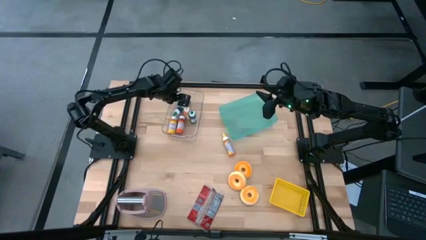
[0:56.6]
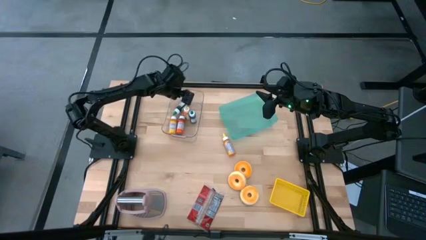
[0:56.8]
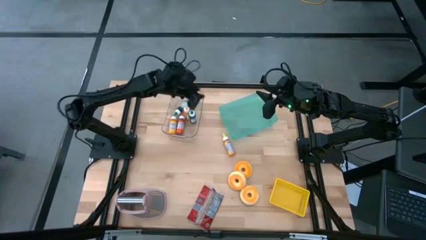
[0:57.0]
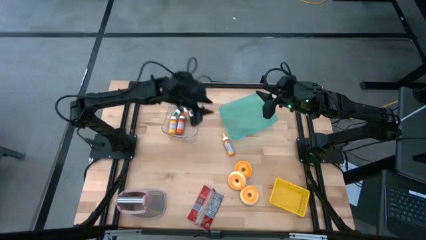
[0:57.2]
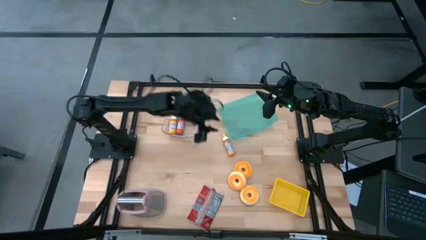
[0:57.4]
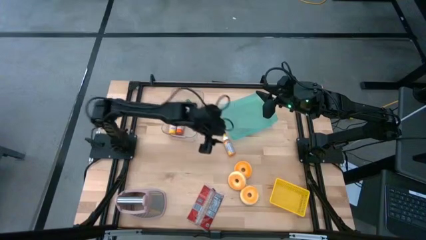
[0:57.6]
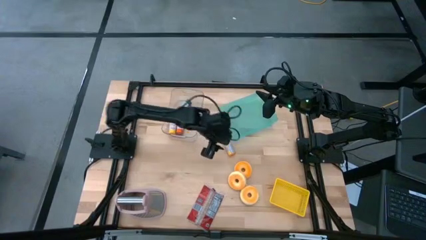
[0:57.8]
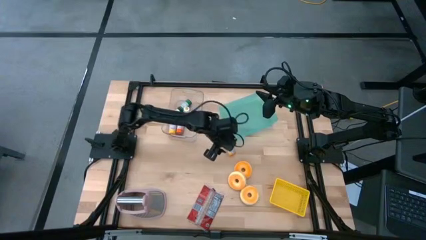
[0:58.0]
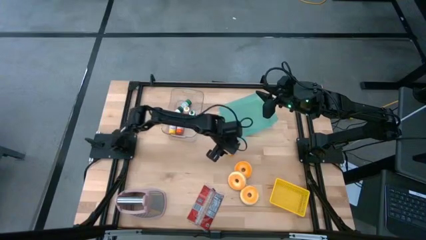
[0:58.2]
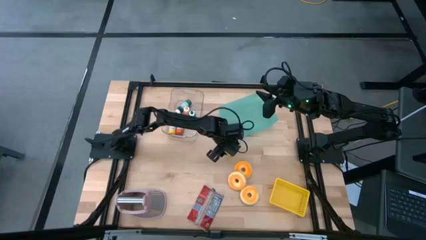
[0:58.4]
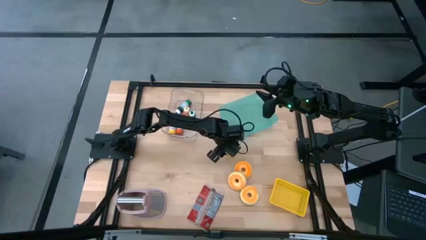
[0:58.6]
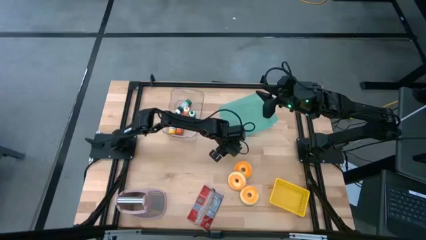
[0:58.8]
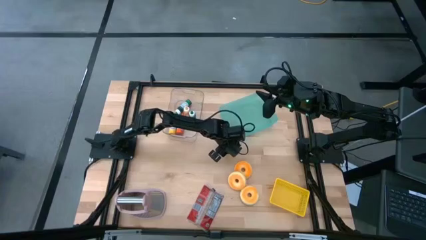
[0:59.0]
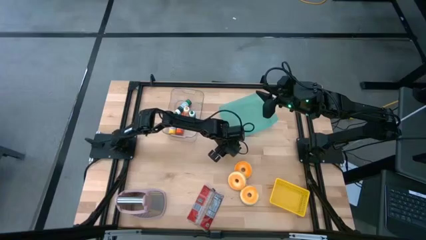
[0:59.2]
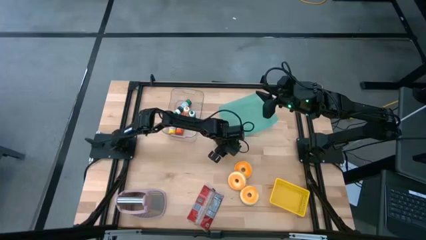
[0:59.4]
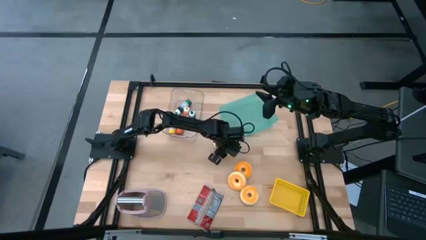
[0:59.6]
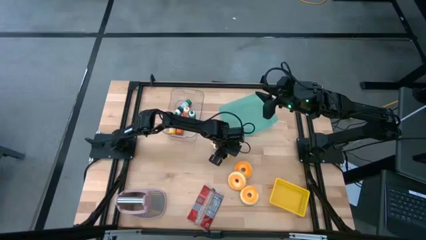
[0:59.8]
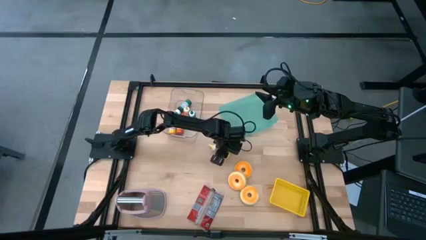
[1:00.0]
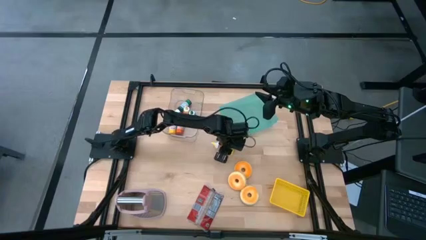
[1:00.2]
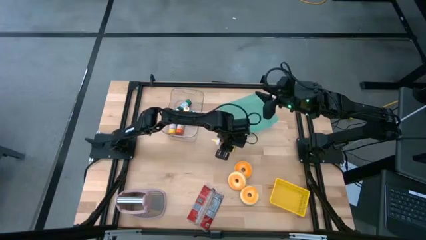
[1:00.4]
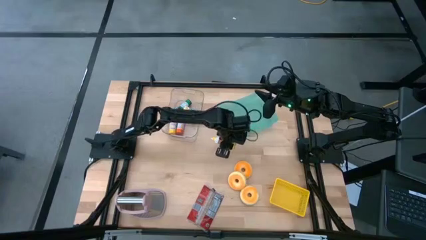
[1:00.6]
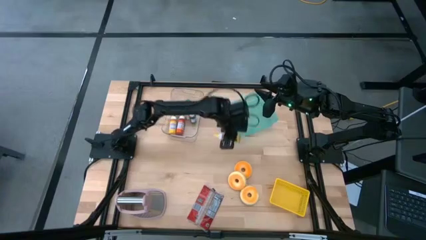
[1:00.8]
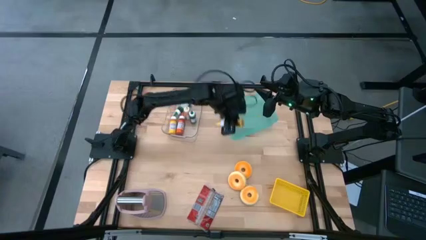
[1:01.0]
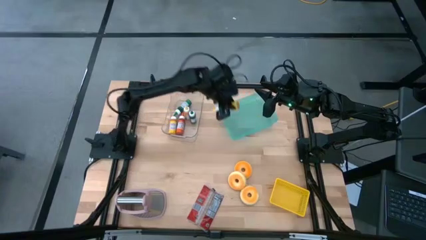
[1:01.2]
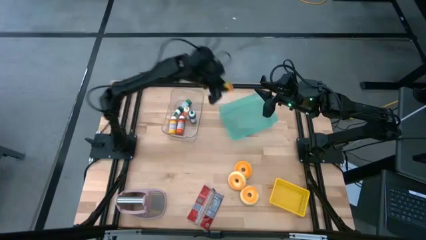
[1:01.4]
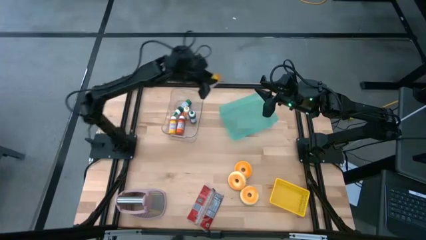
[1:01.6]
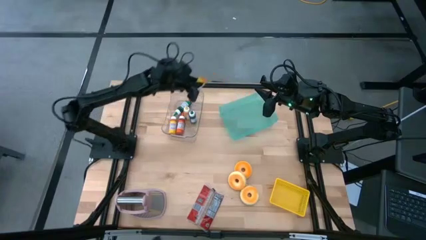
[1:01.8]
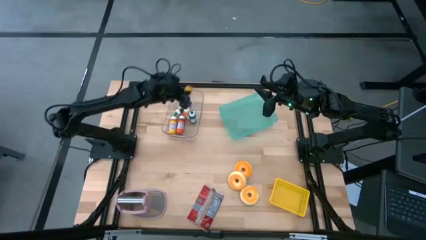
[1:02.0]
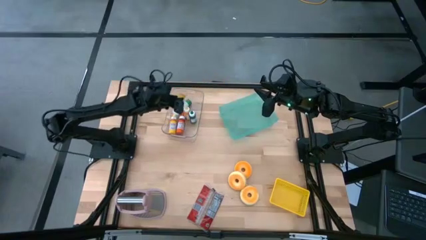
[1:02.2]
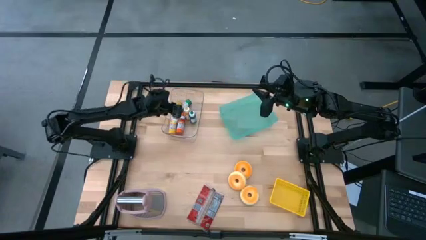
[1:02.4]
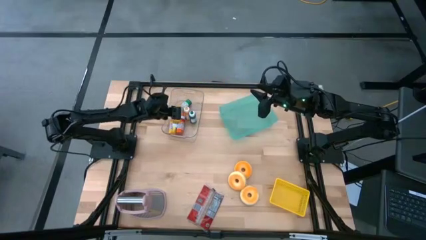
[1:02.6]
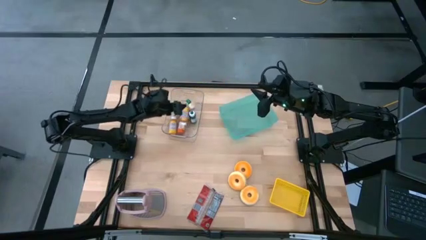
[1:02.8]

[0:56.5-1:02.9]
Put the yellow food coloring bottle into the transparent bin

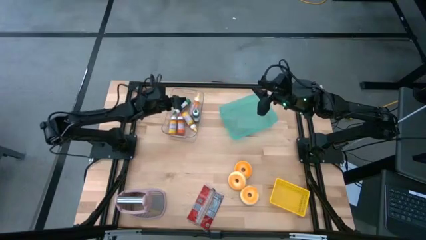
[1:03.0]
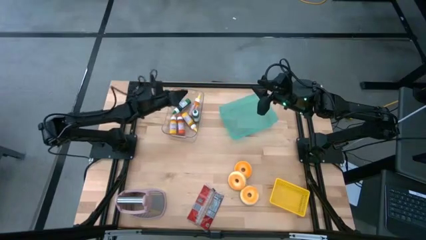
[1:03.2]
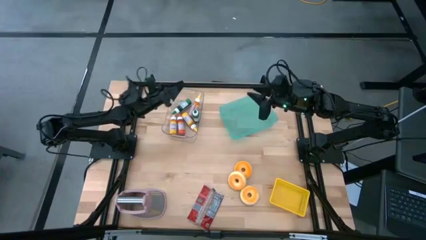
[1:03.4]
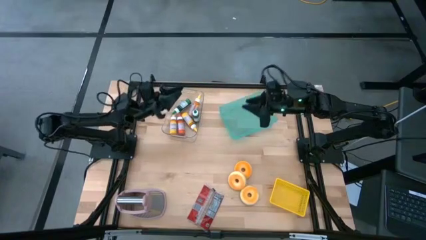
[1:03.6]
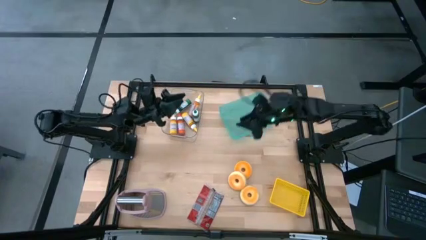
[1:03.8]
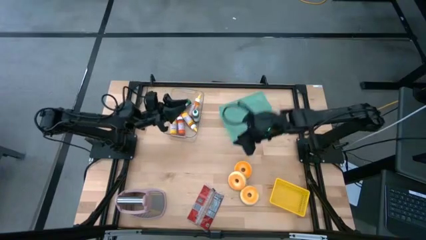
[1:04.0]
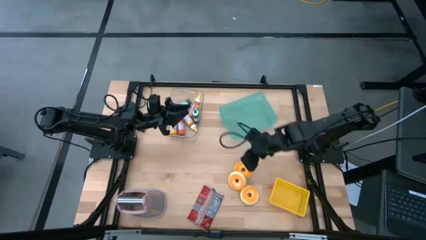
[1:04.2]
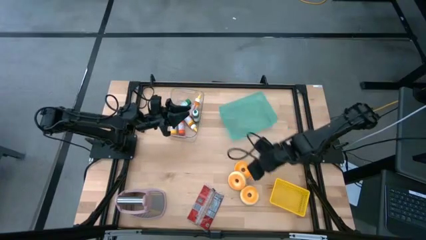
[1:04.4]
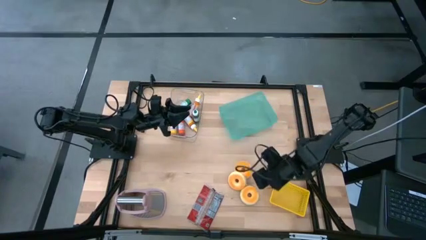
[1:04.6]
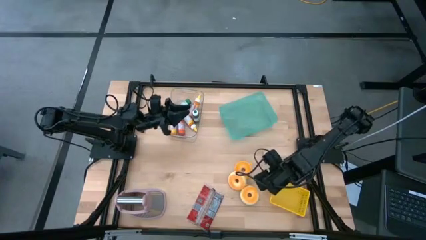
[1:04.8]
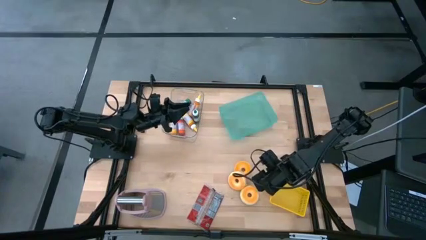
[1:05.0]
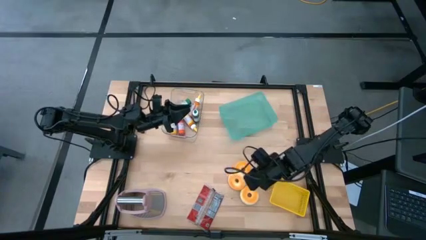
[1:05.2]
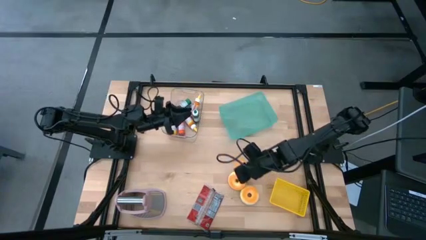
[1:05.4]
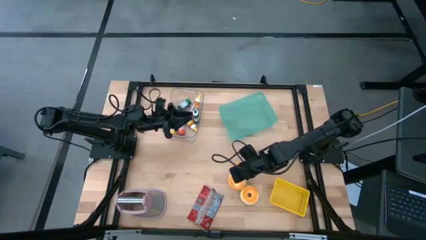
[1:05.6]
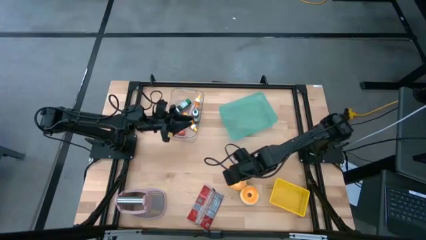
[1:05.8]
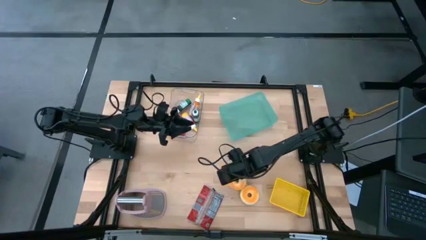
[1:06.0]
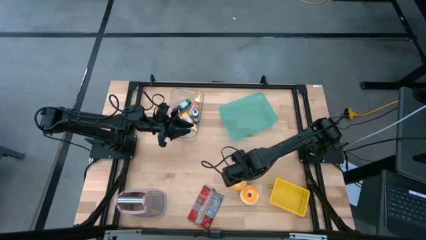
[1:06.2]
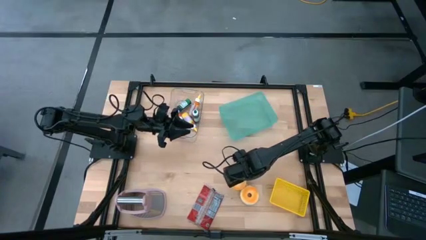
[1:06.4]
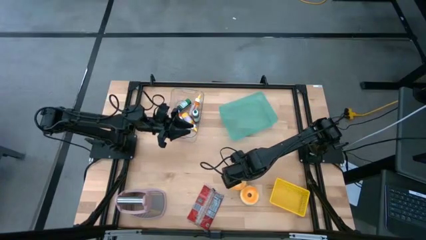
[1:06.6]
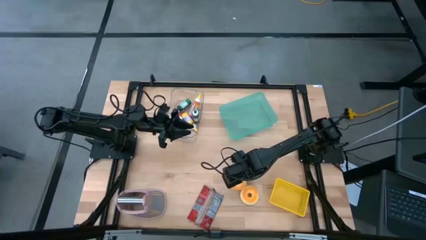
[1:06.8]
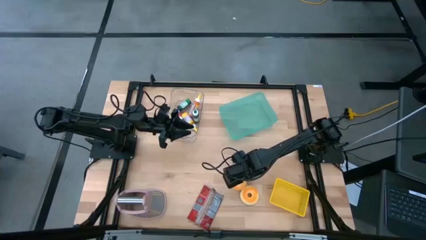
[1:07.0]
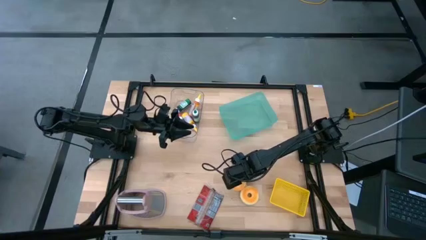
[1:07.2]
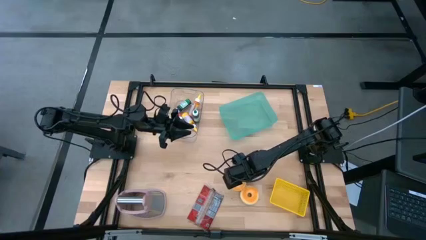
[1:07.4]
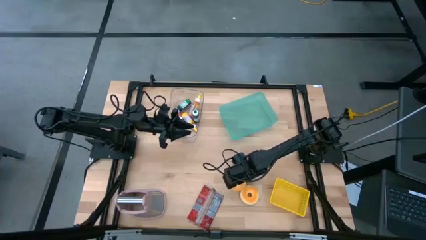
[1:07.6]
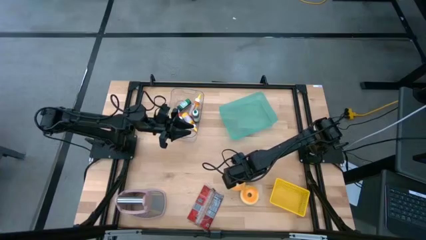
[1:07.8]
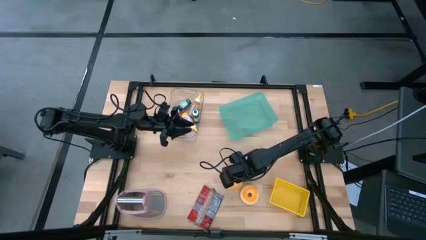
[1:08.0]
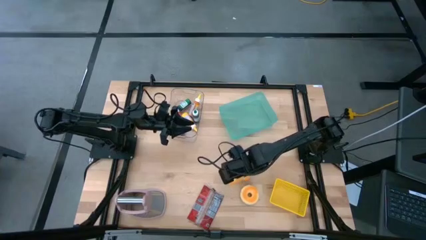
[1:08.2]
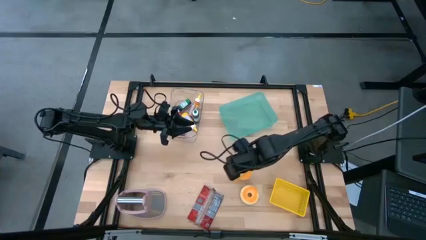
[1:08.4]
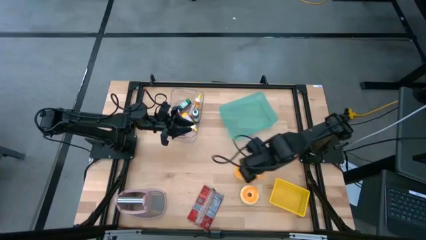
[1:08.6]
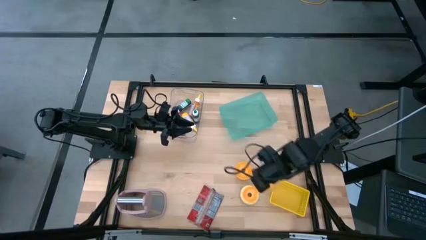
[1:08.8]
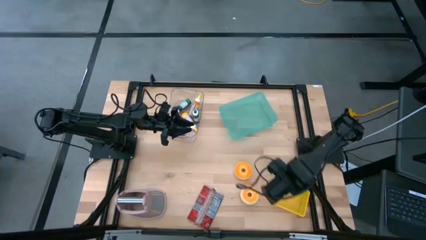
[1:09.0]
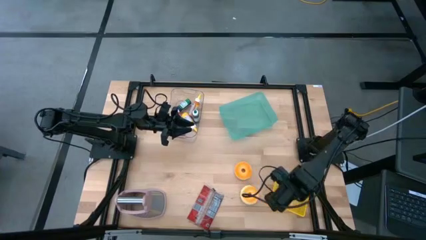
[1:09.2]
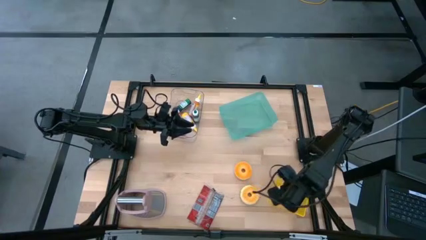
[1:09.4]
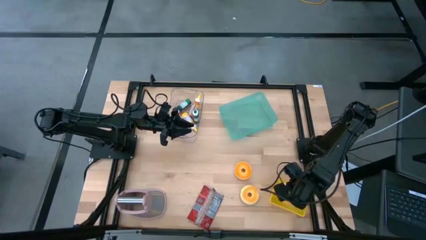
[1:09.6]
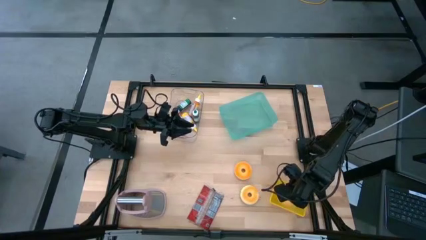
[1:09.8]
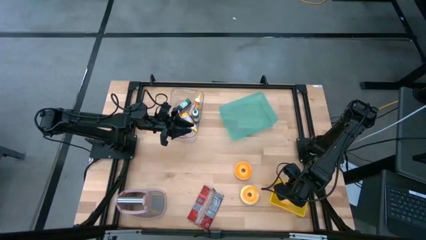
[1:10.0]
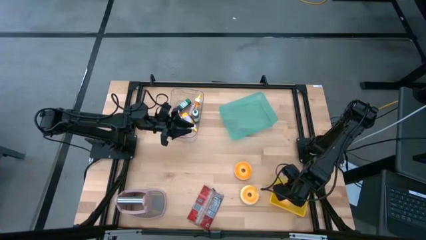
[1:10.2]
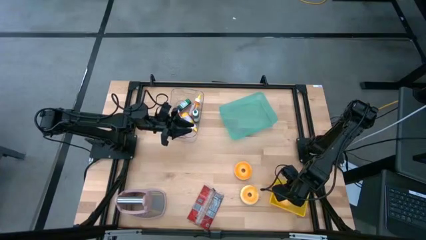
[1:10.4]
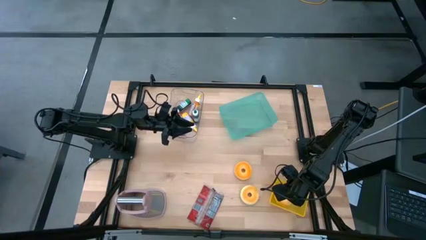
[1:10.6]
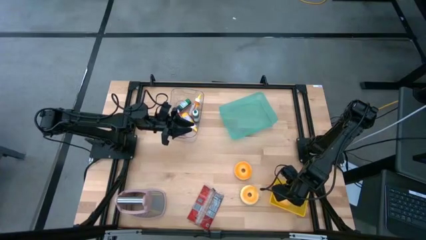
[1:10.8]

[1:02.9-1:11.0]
Put the pink donut into the yellow bin
